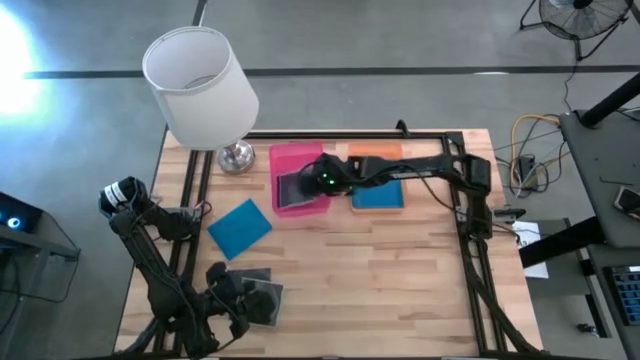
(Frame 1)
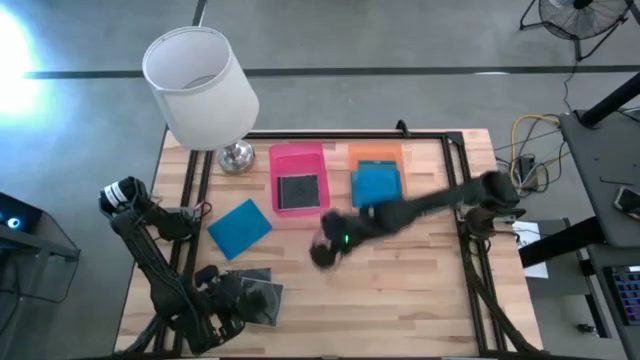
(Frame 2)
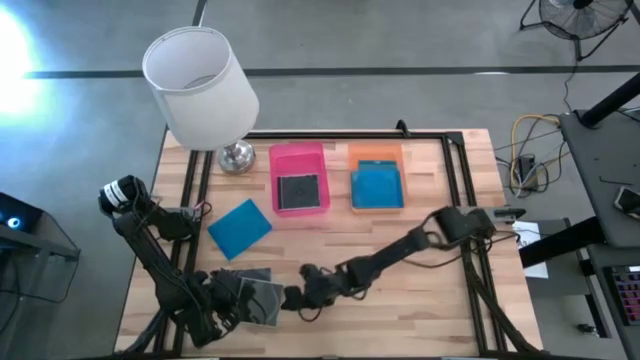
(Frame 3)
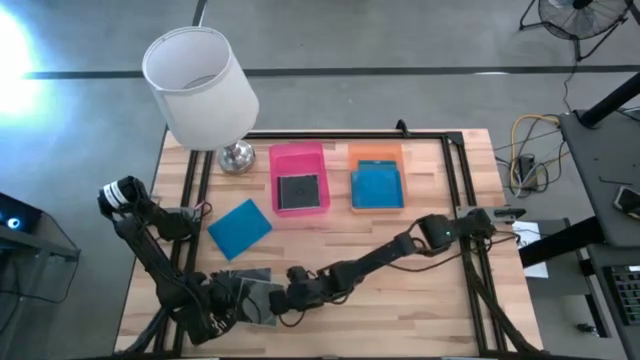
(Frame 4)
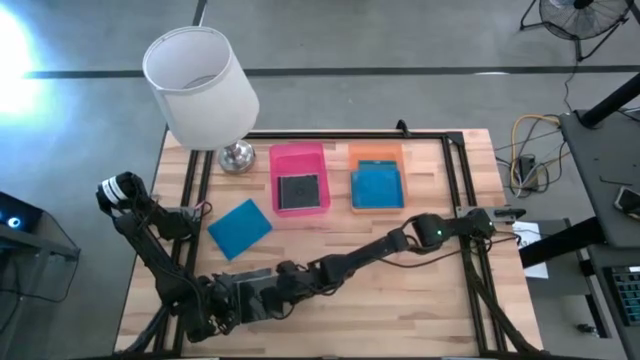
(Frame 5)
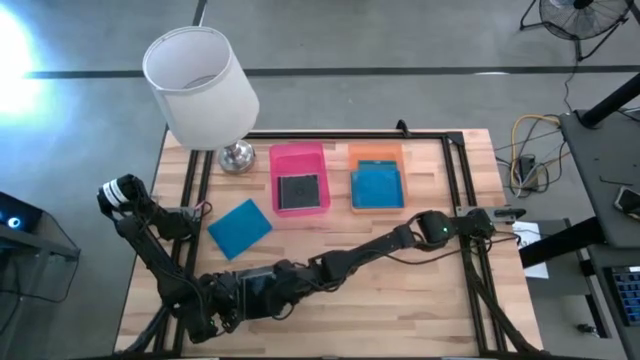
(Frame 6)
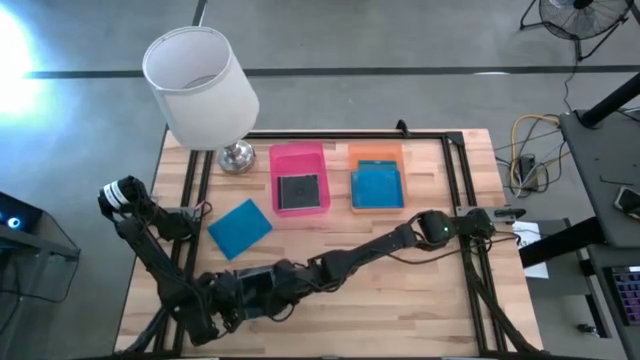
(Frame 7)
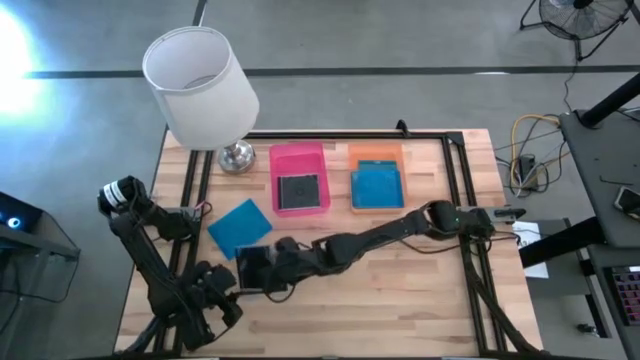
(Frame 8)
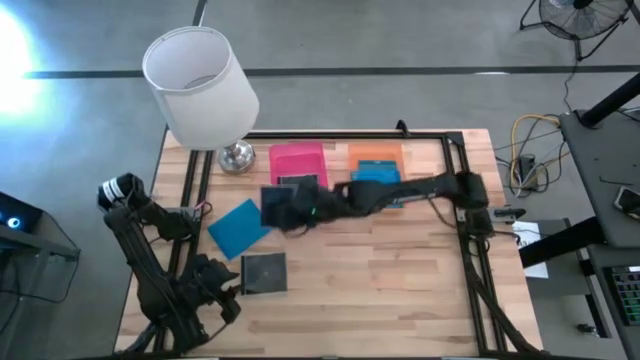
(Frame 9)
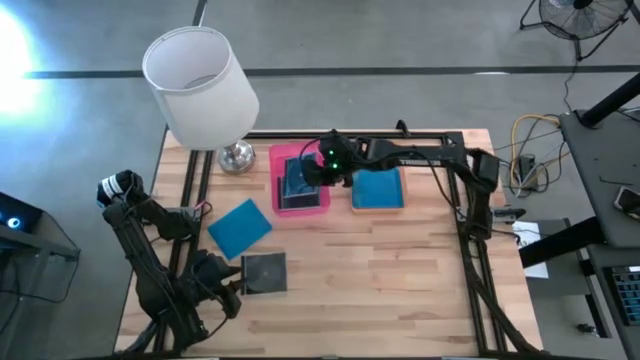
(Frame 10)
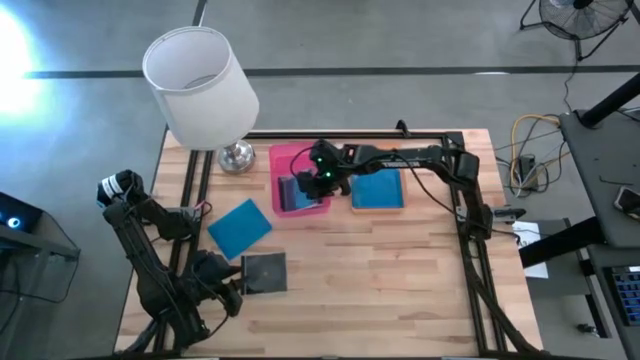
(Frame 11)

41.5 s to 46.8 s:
Task: Pick & place jewel cases by type
Put the black cd case into the red bin

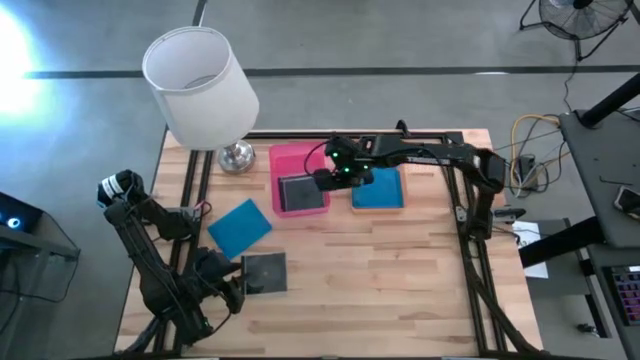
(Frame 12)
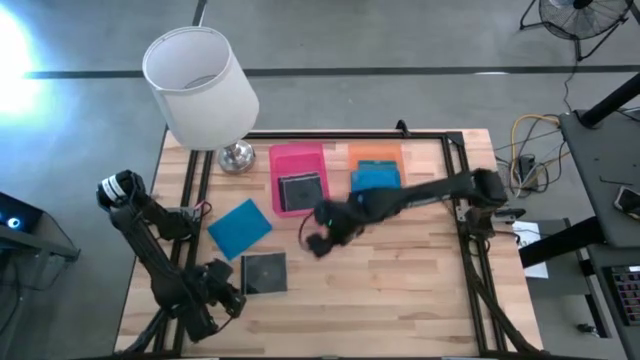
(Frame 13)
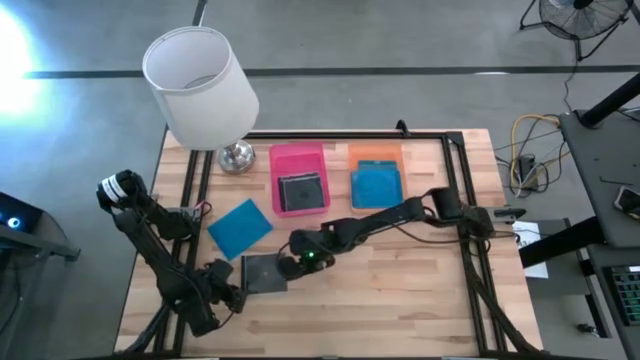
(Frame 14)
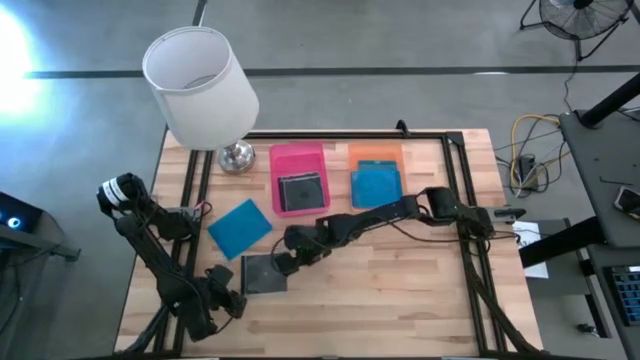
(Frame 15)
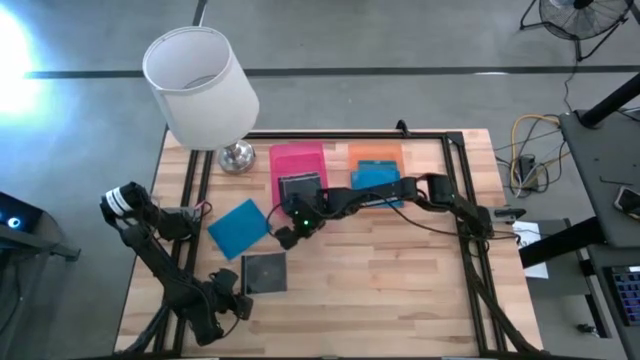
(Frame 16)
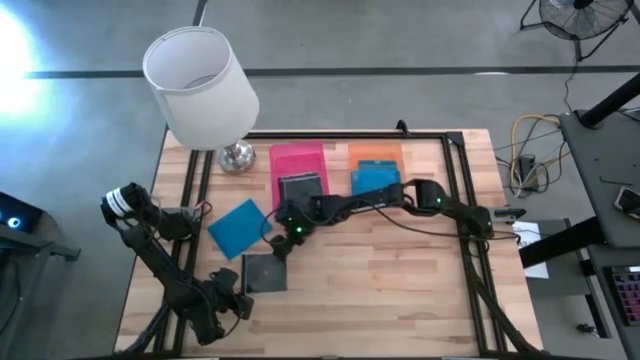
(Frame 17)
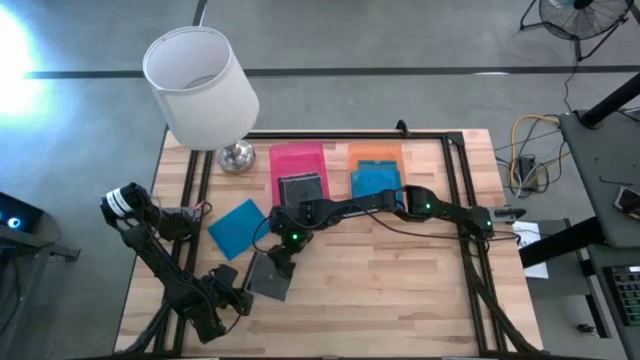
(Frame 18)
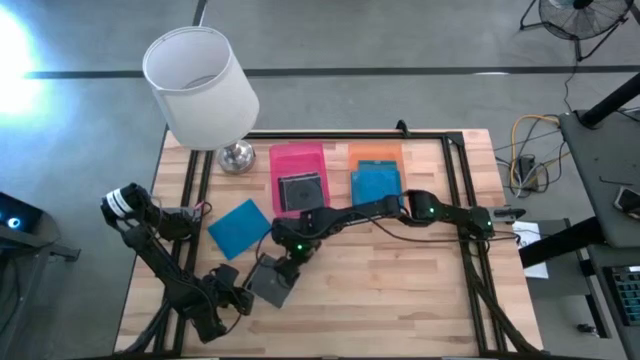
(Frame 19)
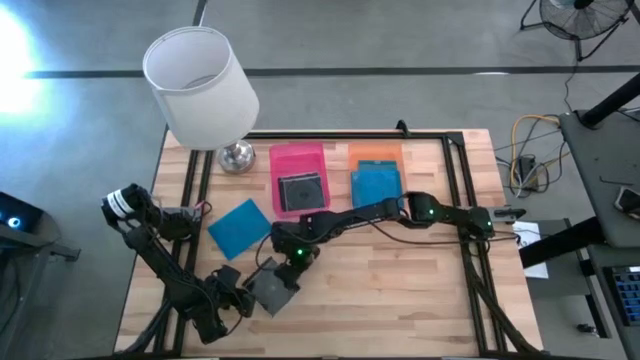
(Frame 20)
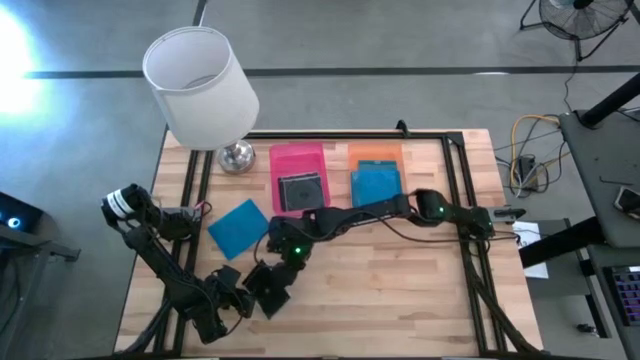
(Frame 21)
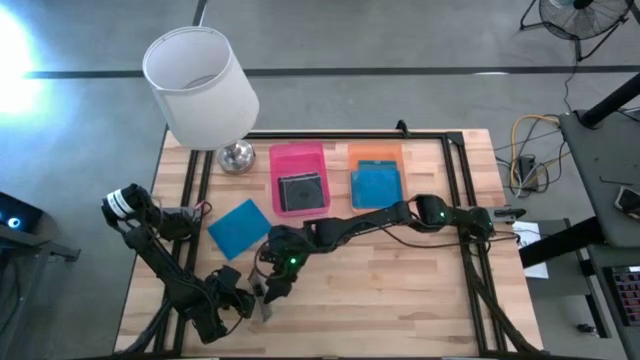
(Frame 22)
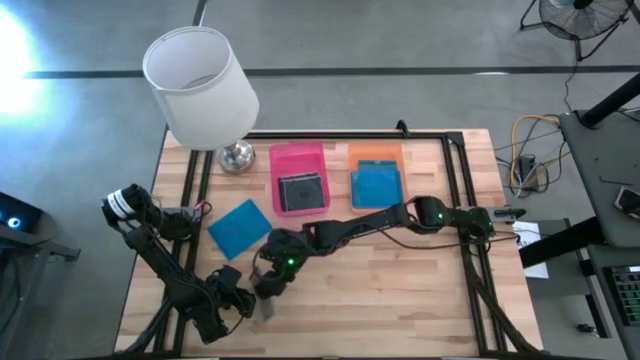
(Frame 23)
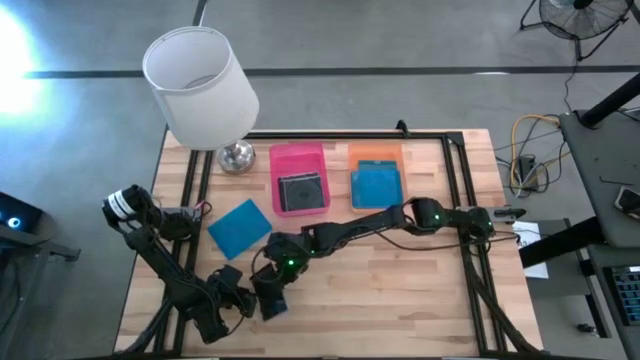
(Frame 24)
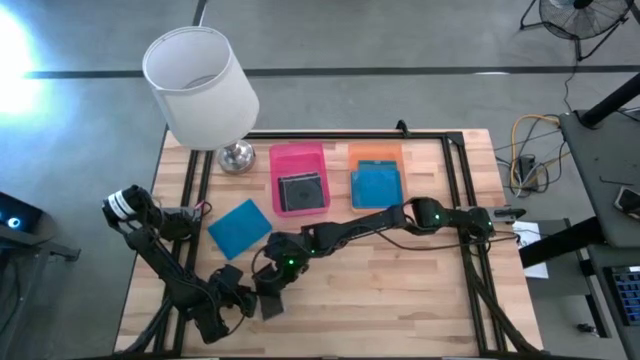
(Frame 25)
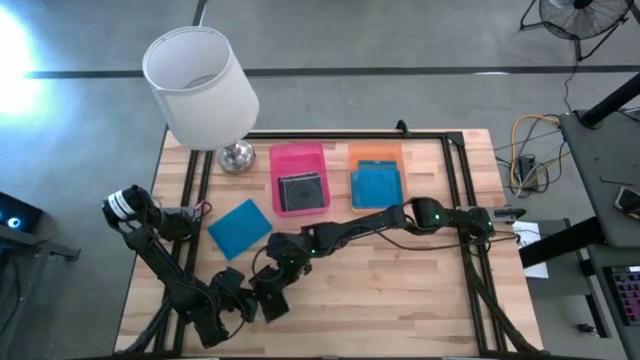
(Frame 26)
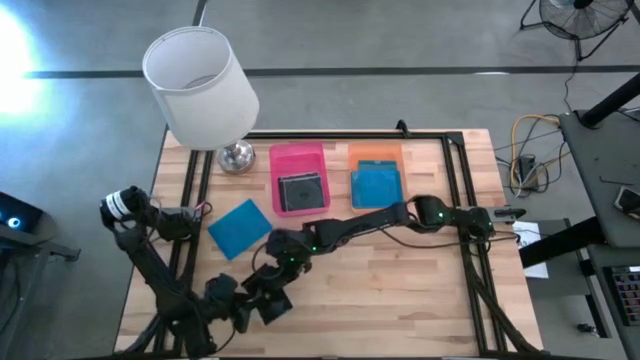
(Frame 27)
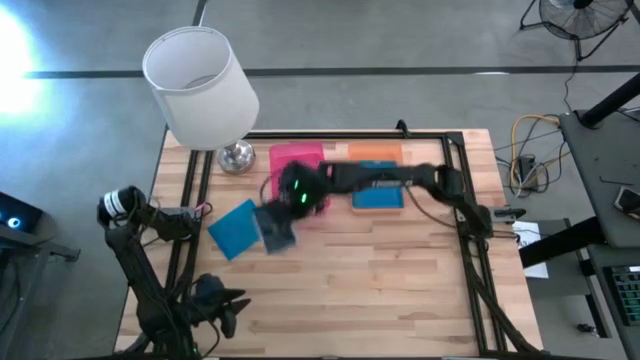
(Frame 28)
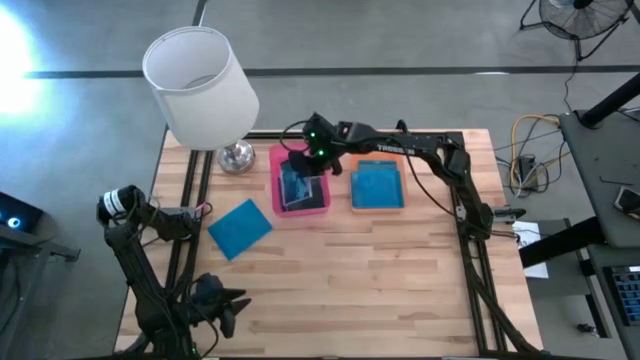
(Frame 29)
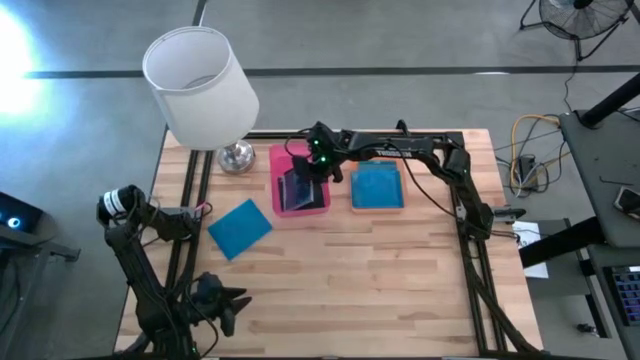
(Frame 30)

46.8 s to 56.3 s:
Put the black cd case into the red bin

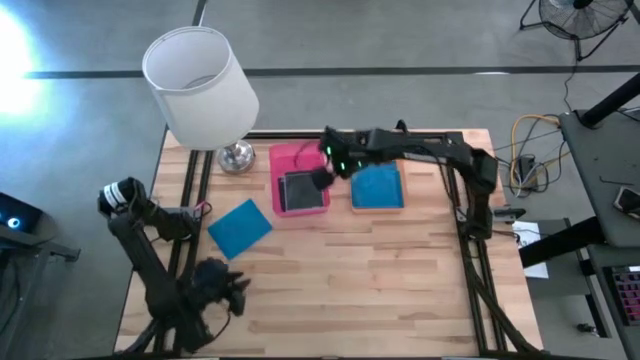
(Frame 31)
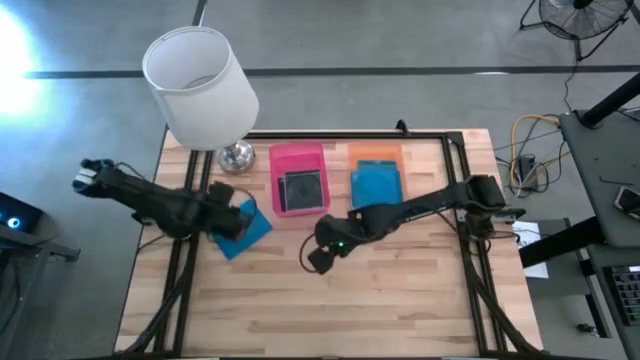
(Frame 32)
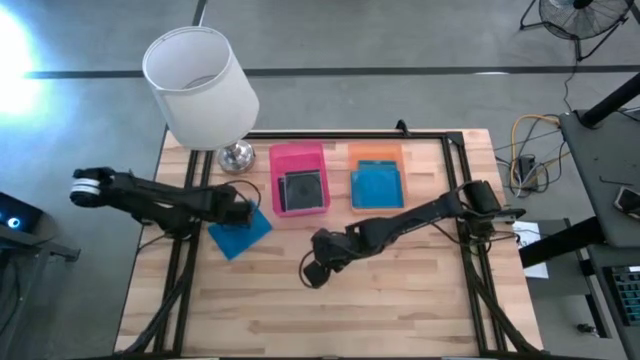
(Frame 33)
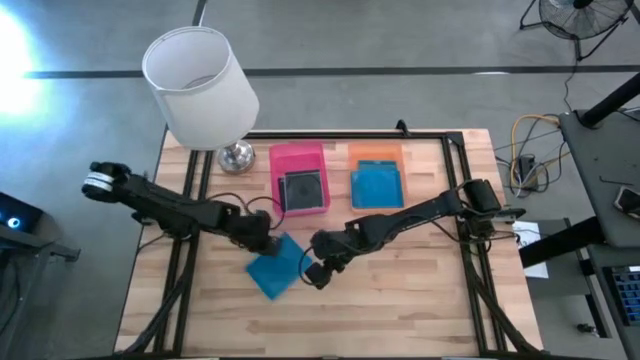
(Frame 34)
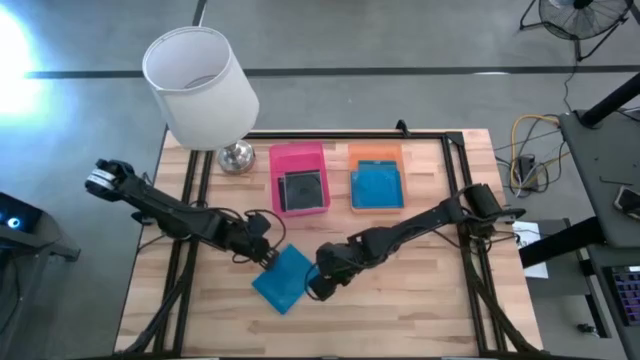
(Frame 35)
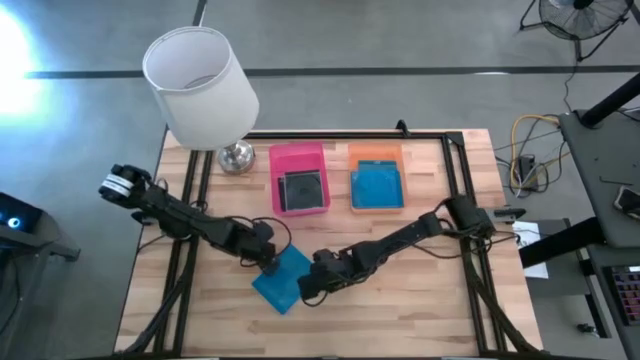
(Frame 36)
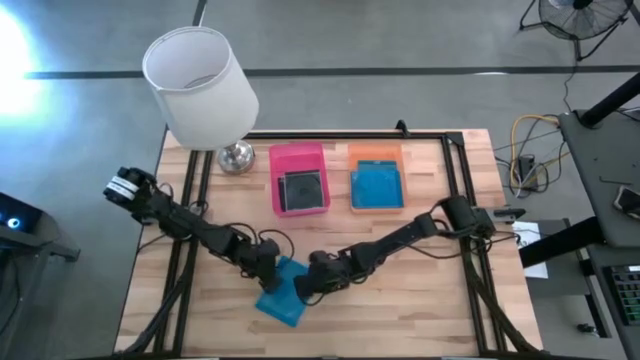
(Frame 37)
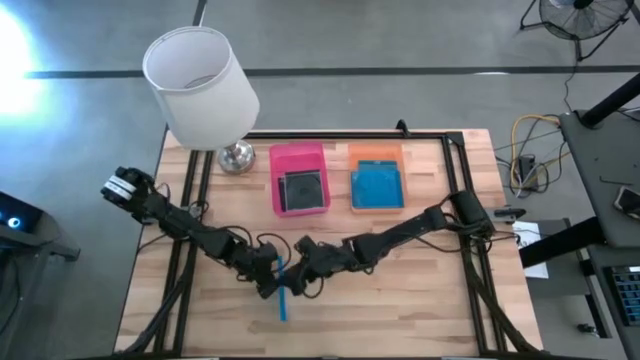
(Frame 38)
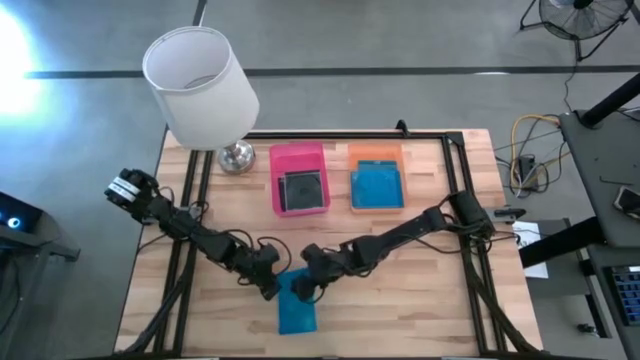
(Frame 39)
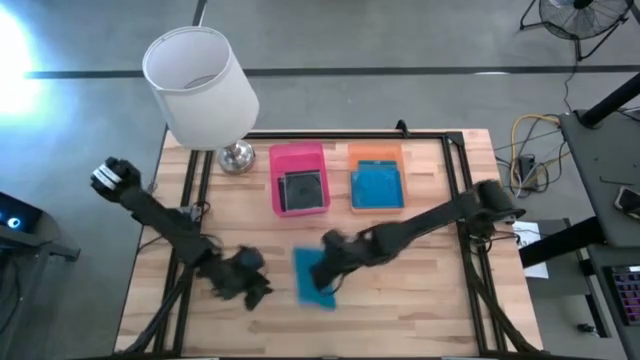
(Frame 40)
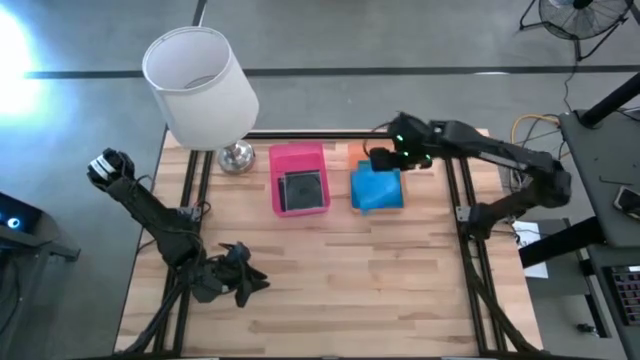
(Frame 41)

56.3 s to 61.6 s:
Put the blue cd case into the orange bin
